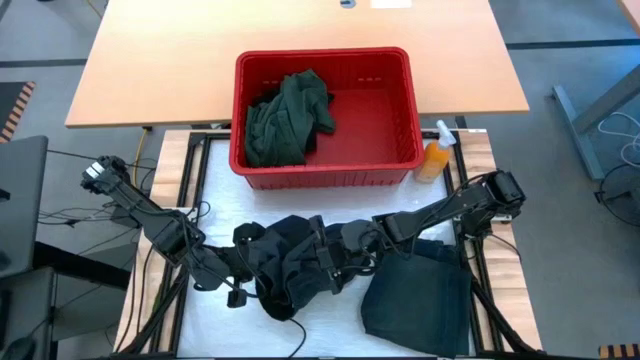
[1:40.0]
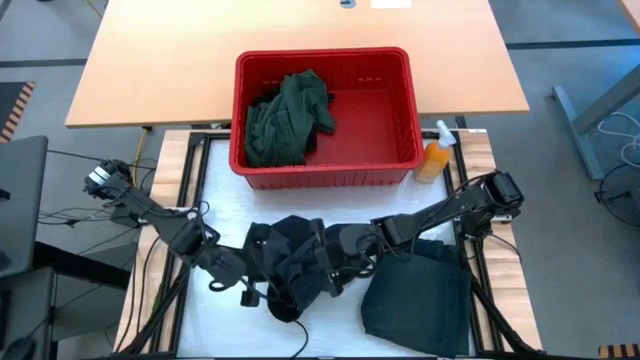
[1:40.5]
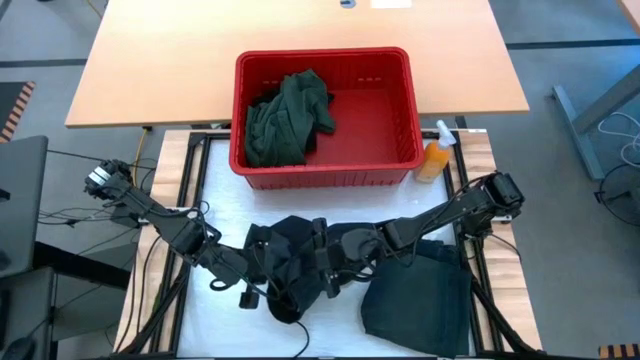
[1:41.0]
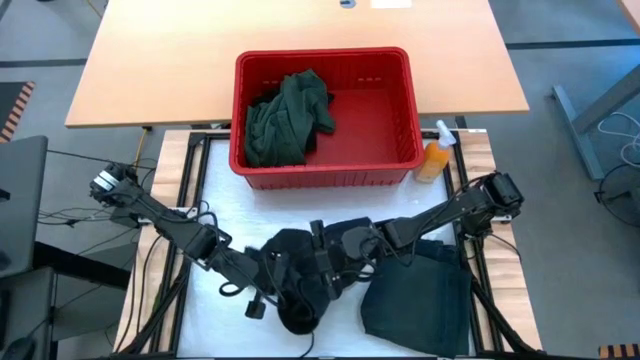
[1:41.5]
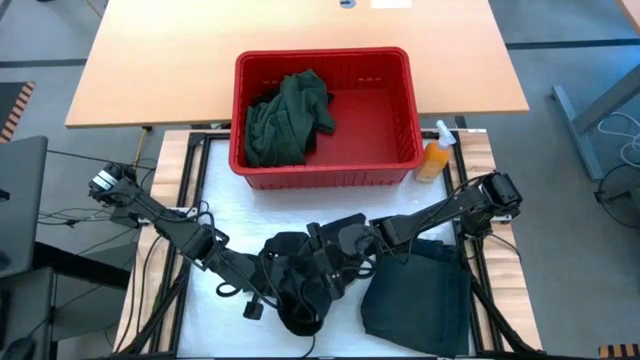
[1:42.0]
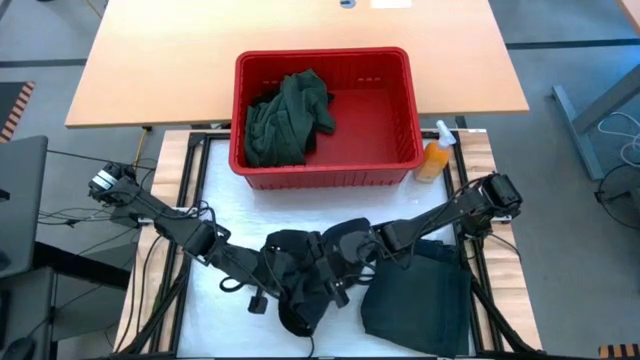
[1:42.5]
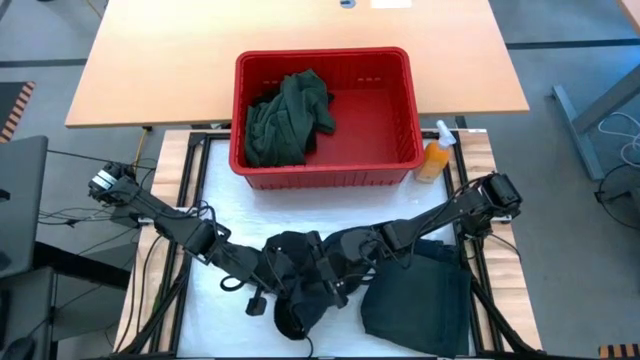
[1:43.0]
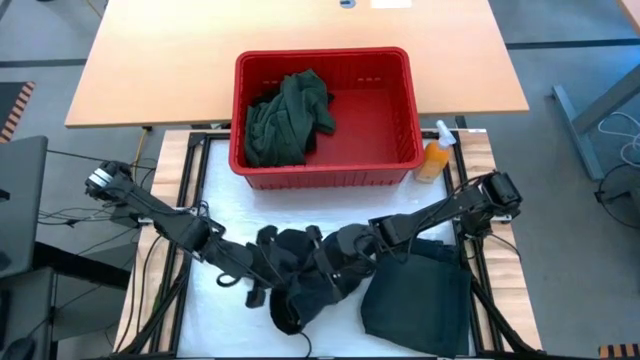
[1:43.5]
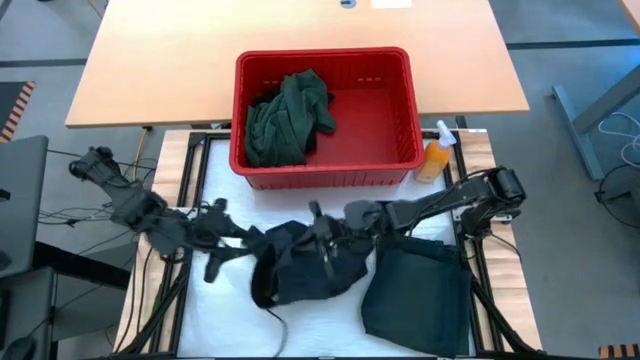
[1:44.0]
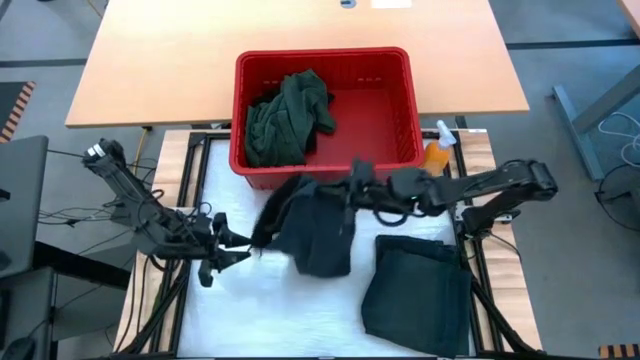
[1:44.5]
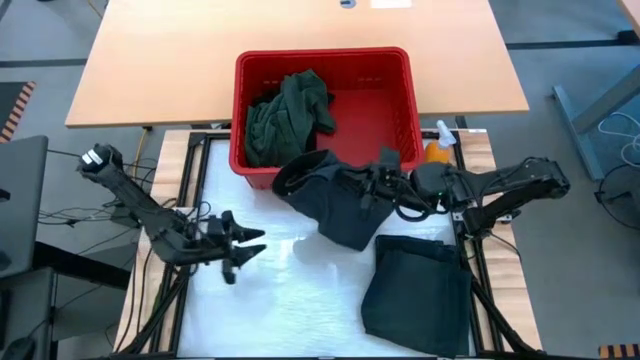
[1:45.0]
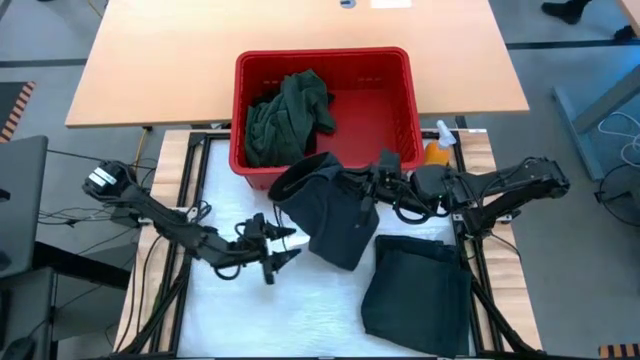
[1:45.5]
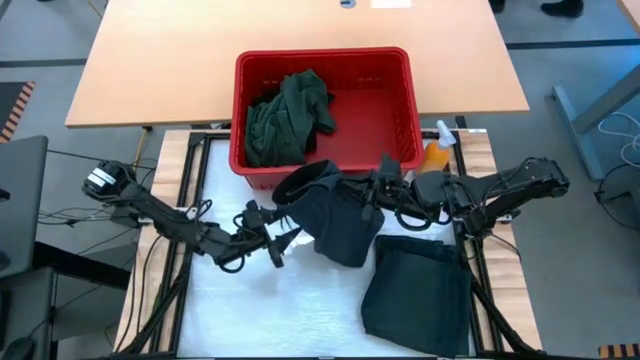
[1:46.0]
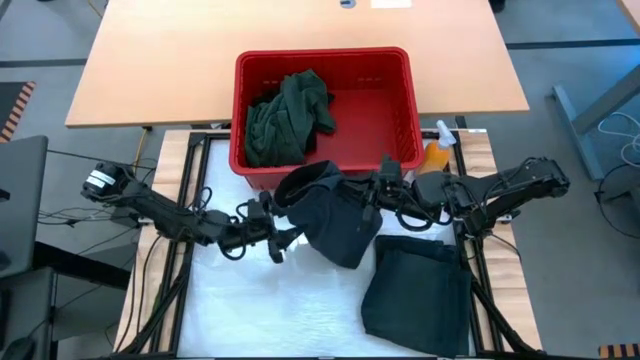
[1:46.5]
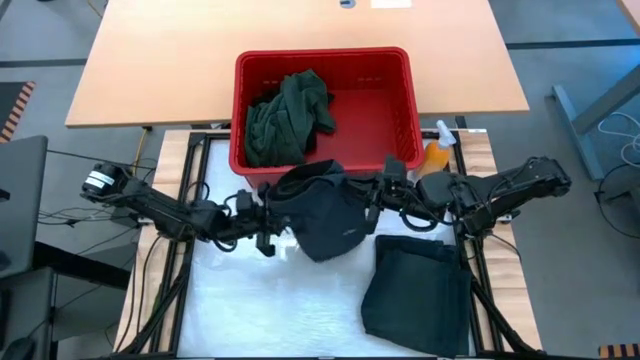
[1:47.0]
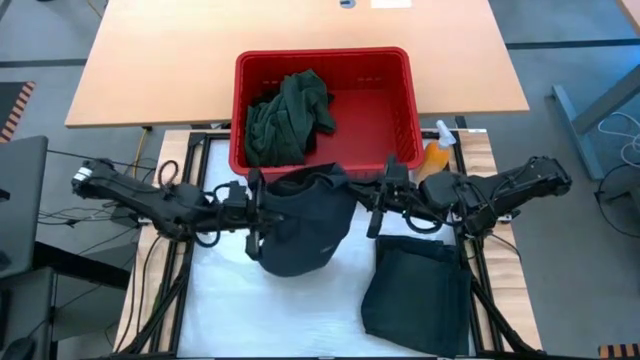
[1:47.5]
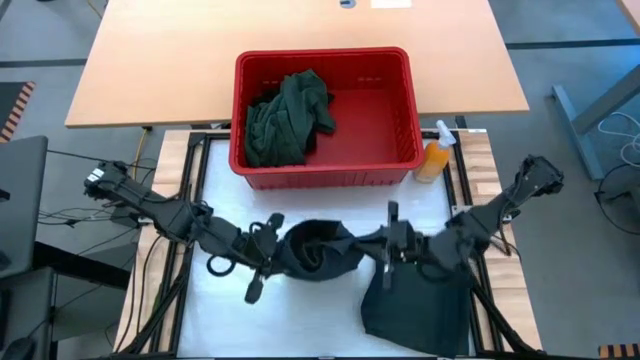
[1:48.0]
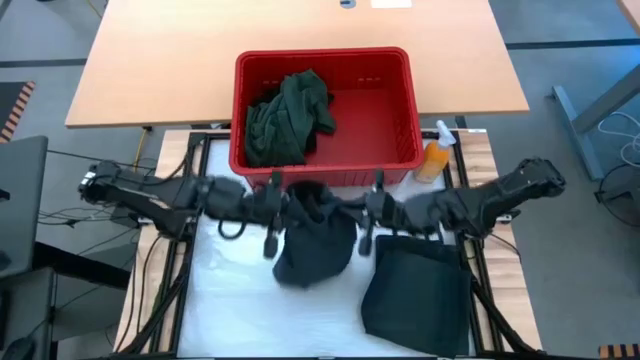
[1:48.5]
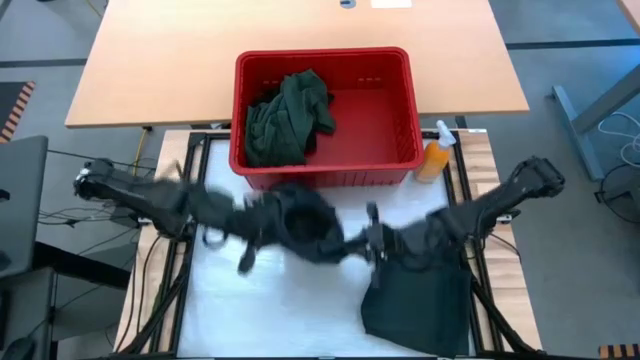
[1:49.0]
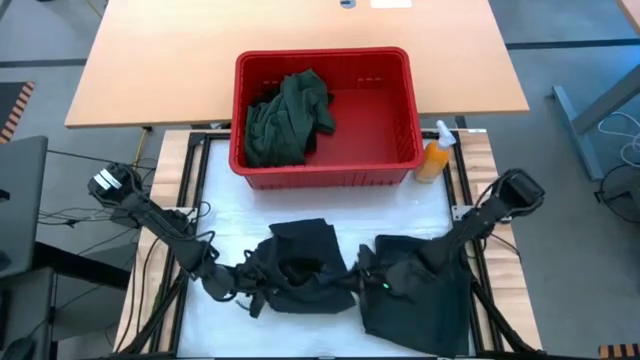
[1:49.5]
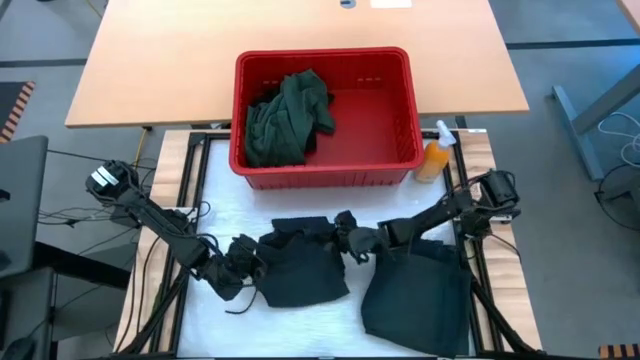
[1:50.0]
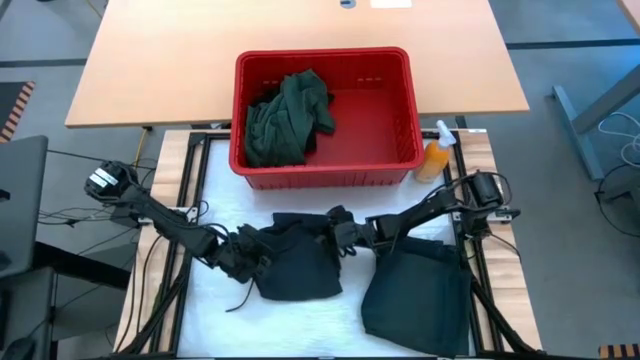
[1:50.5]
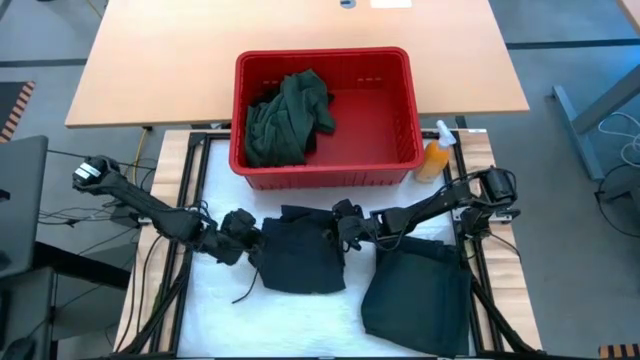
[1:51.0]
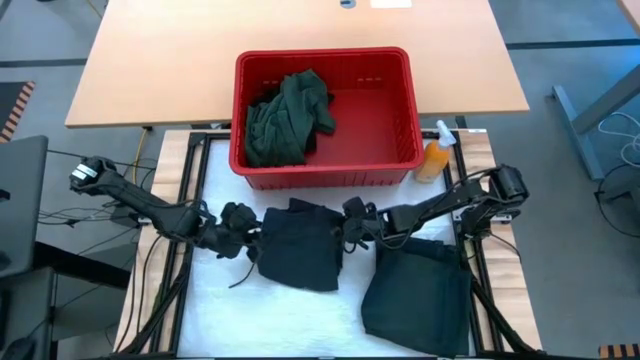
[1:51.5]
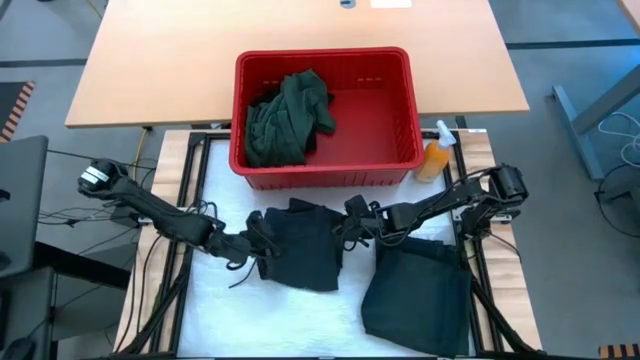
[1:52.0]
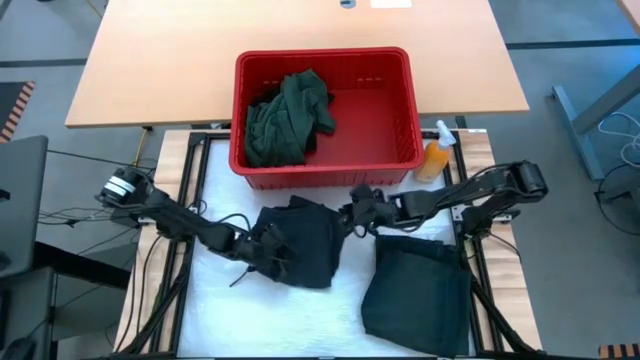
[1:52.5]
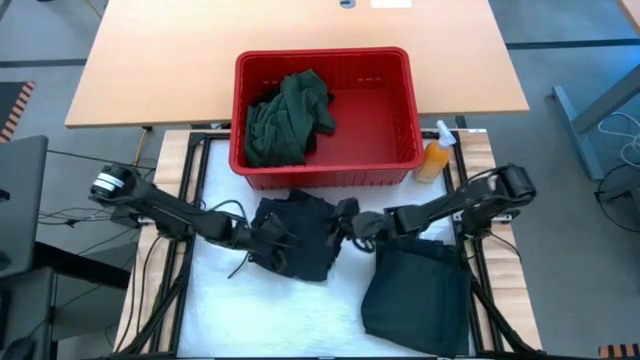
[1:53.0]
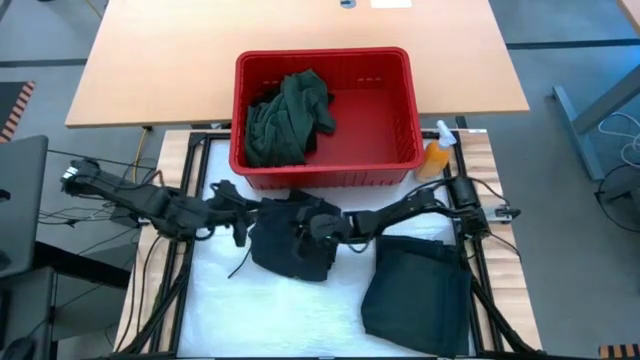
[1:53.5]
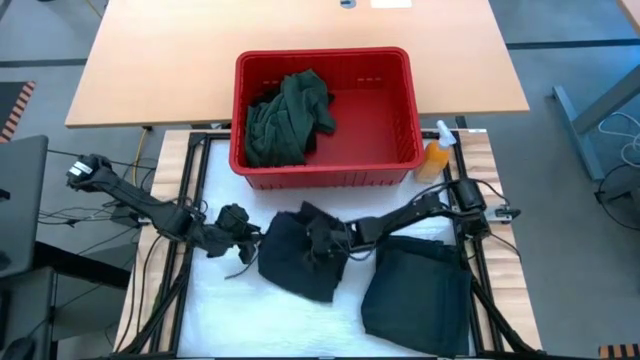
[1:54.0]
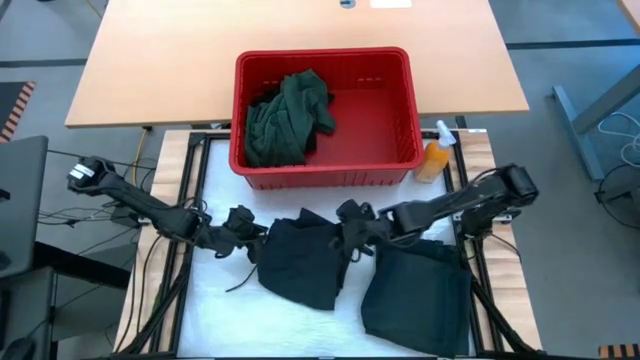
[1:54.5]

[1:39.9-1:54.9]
Task: Fold laundry
Fold the gray shorts

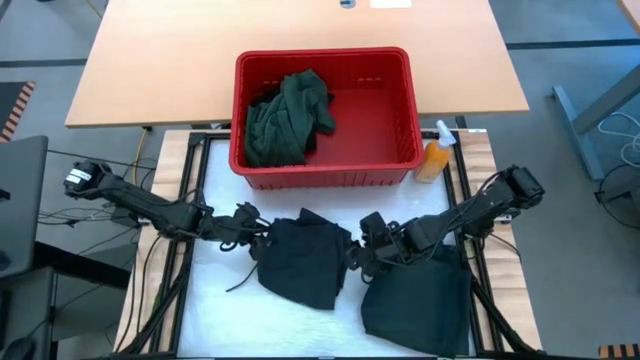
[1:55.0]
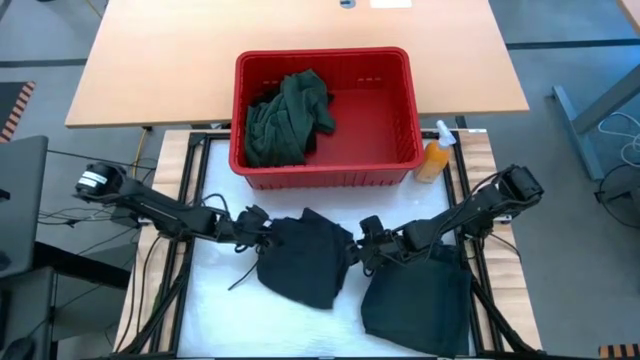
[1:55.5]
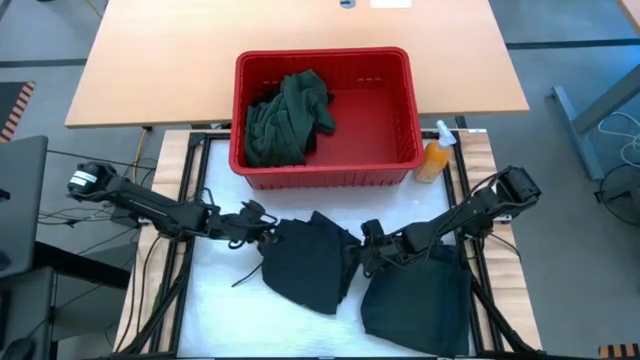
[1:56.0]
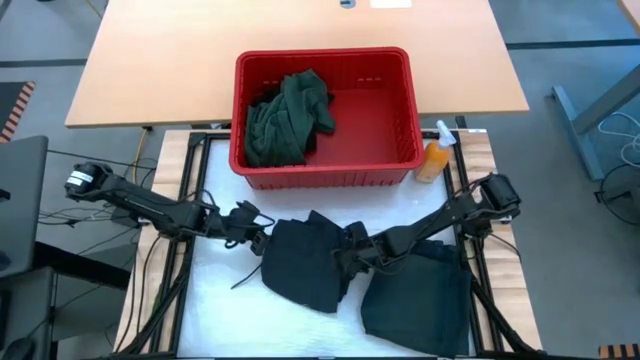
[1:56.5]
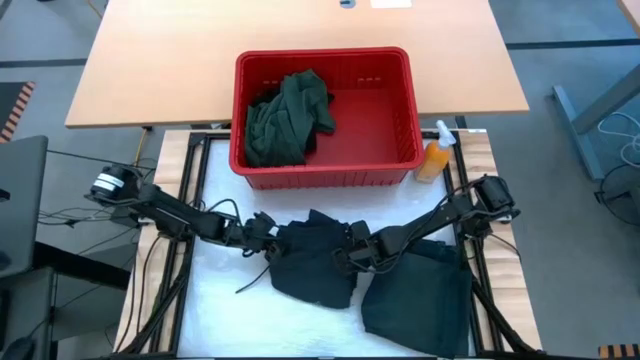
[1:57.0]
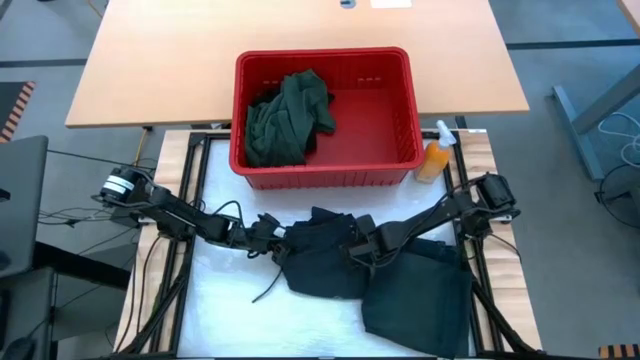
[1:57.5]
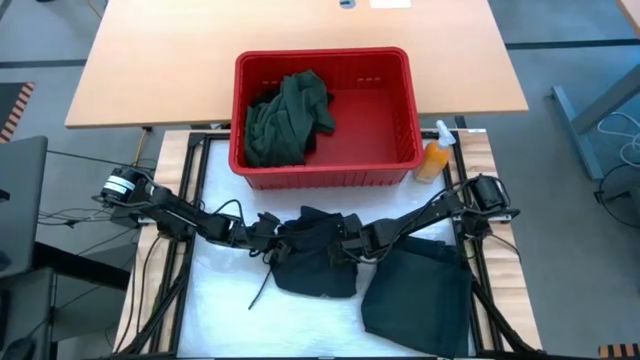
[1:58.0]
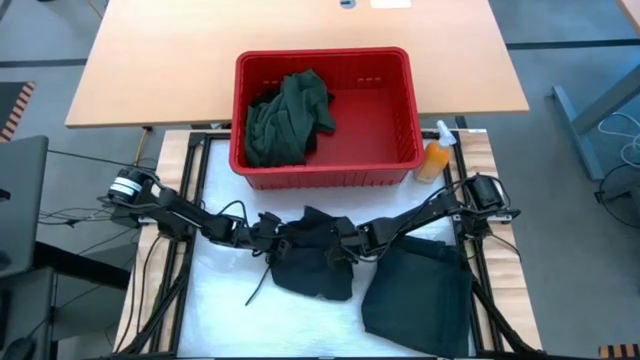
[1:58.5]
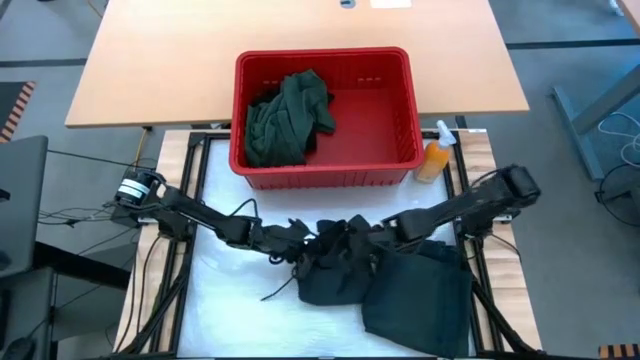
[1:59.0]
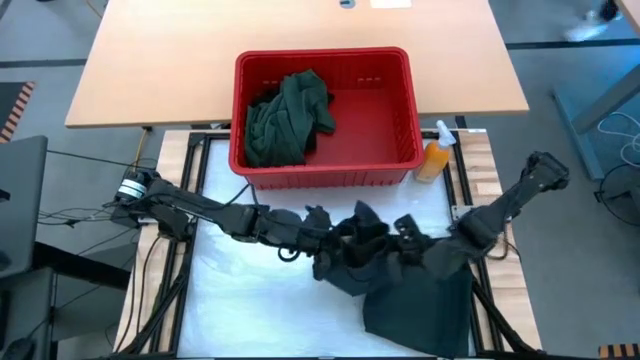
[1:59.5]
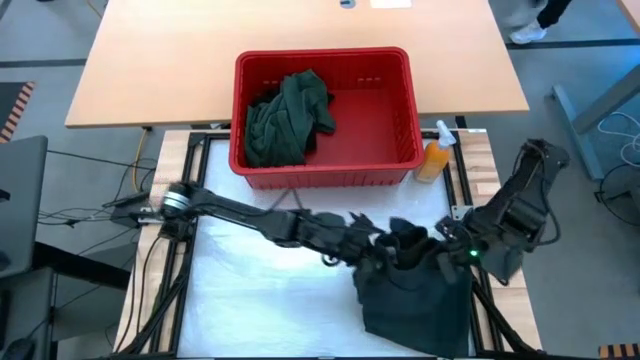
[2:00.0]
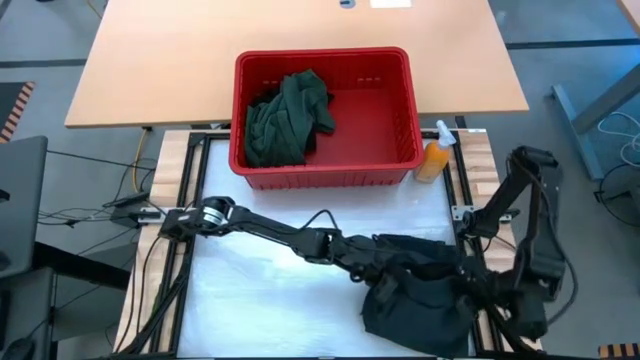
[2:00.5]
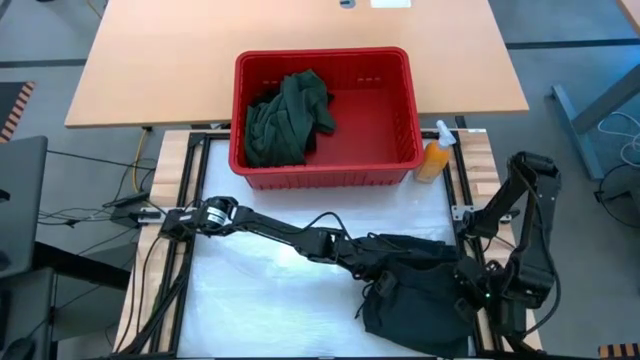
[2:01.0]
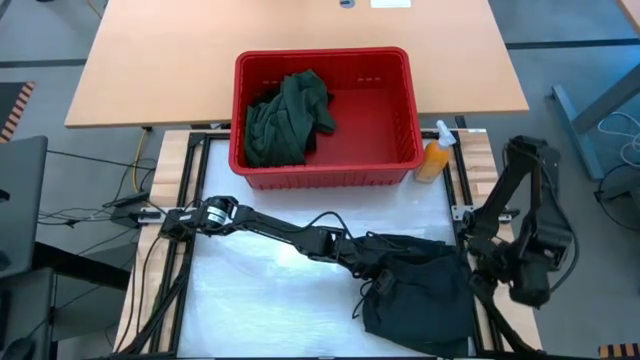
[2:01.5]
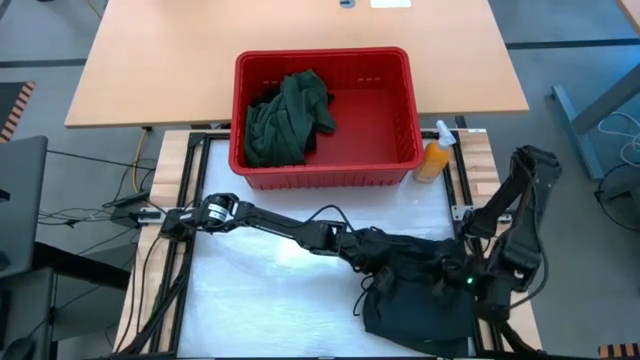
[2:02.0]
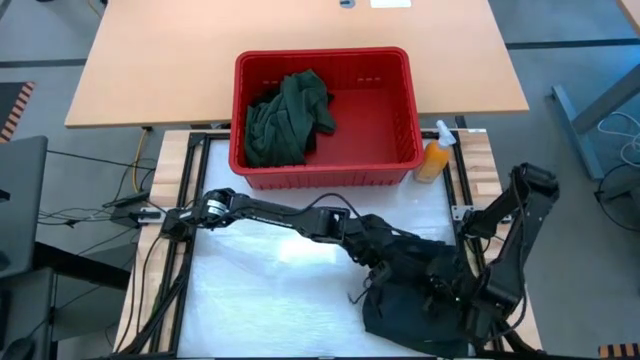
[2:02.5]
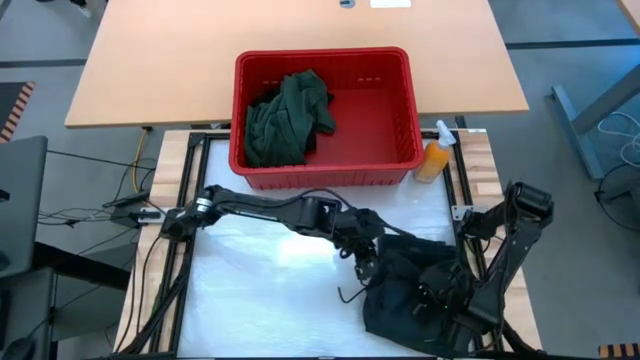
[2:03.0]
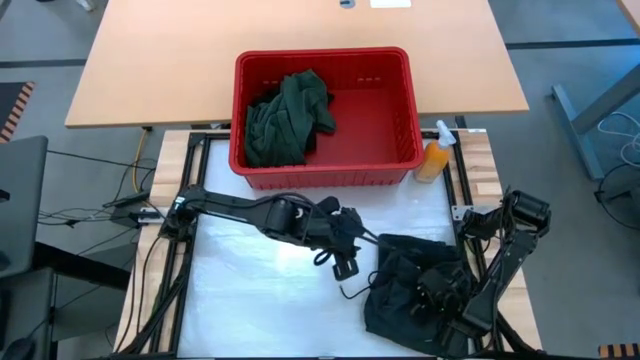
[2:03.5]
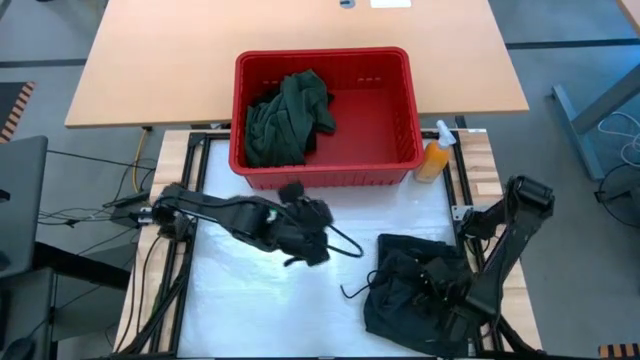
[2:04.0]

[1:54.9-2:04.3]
Stack the folded gray shorts on top of the folded black pants
